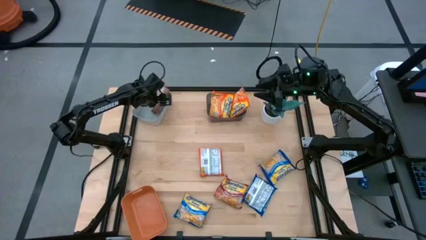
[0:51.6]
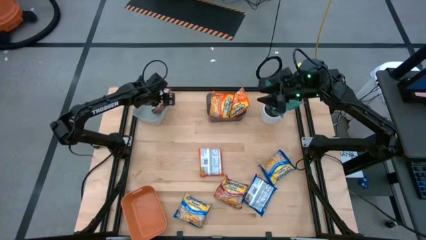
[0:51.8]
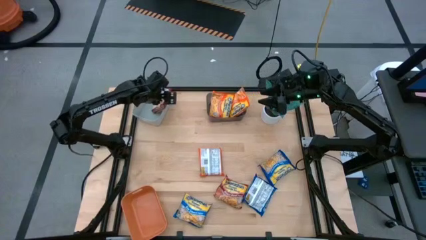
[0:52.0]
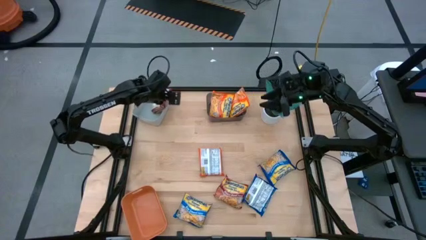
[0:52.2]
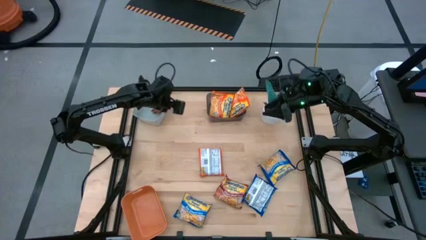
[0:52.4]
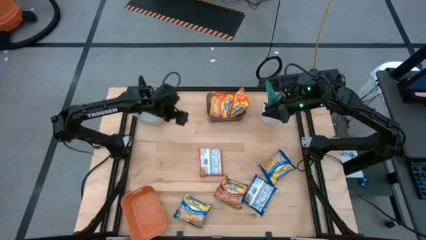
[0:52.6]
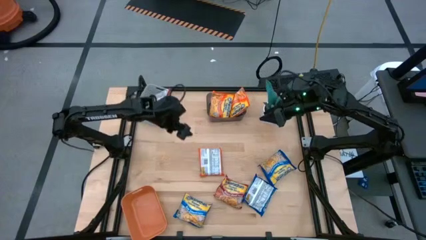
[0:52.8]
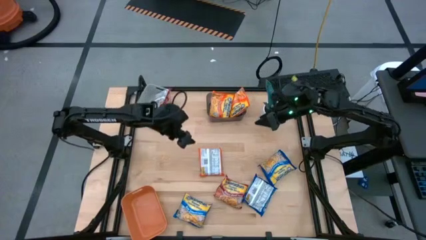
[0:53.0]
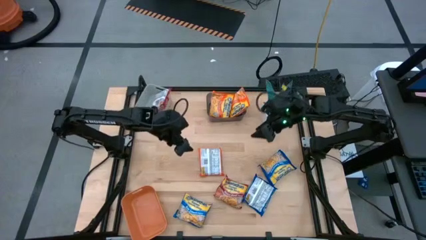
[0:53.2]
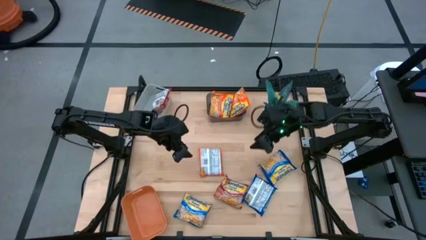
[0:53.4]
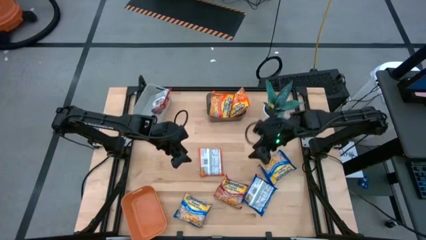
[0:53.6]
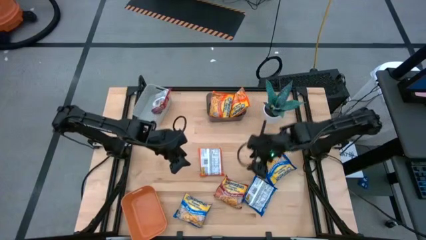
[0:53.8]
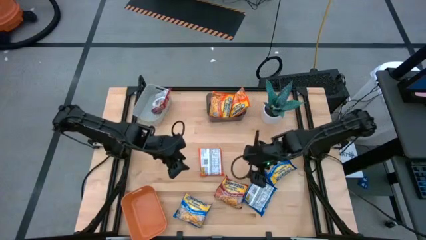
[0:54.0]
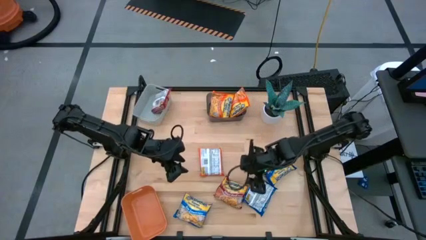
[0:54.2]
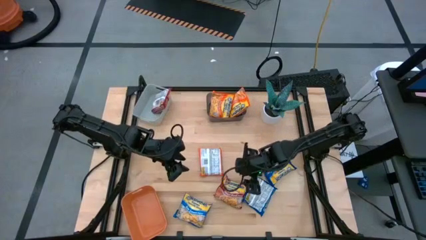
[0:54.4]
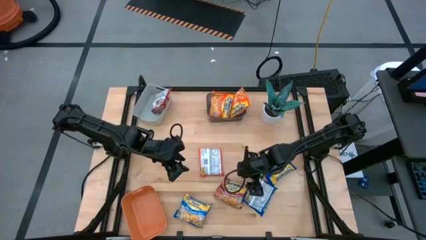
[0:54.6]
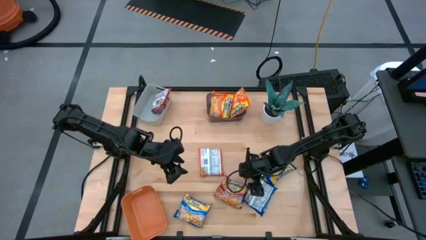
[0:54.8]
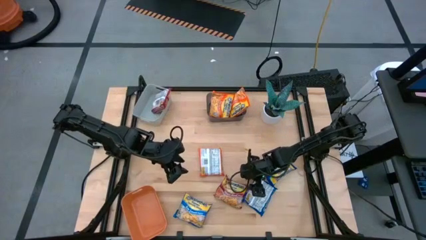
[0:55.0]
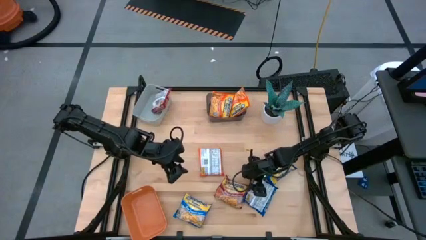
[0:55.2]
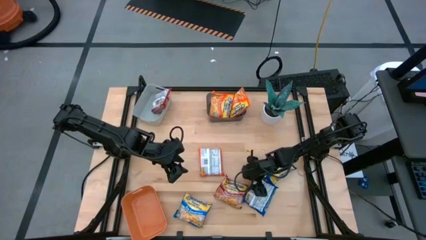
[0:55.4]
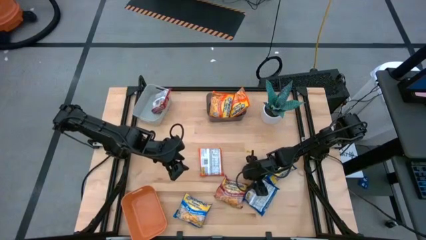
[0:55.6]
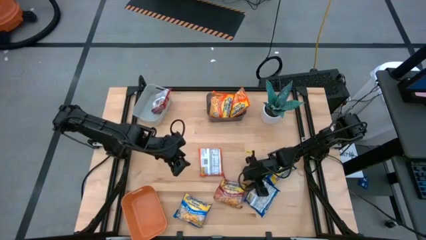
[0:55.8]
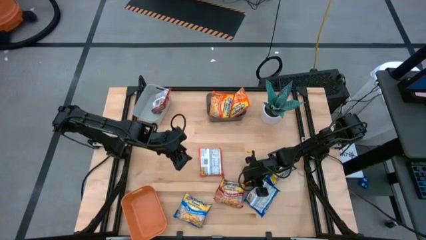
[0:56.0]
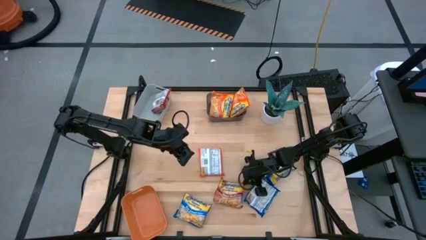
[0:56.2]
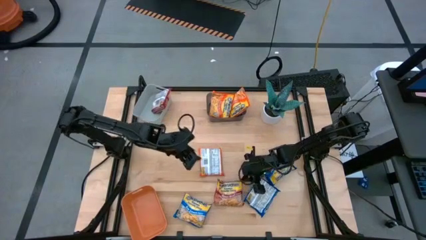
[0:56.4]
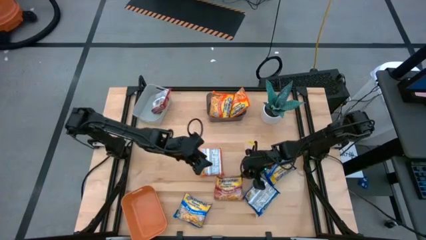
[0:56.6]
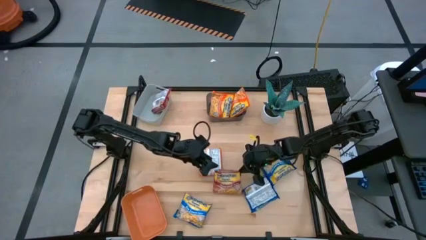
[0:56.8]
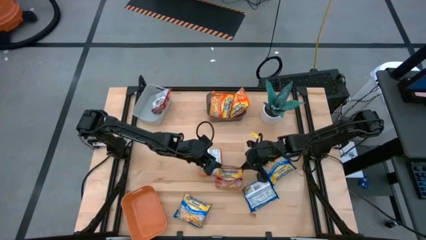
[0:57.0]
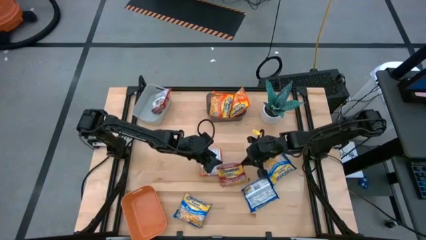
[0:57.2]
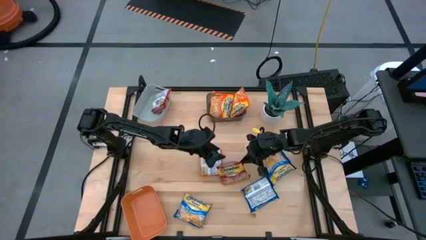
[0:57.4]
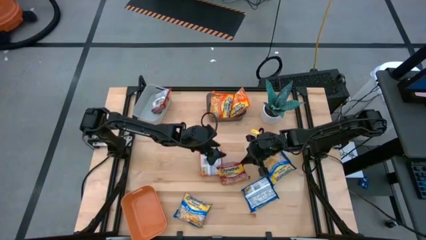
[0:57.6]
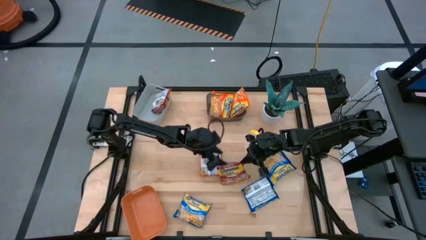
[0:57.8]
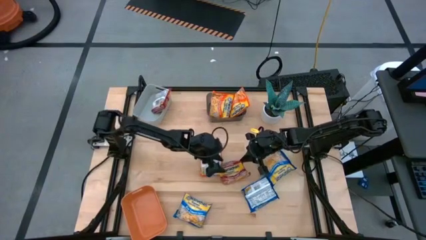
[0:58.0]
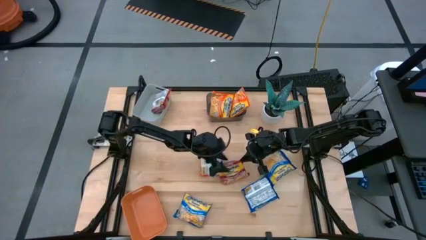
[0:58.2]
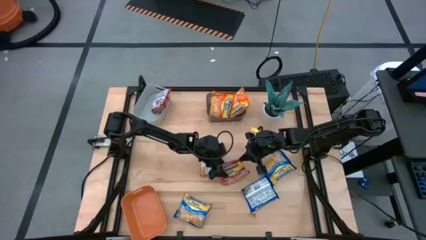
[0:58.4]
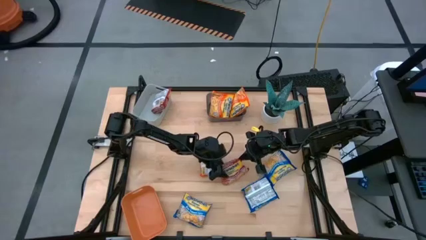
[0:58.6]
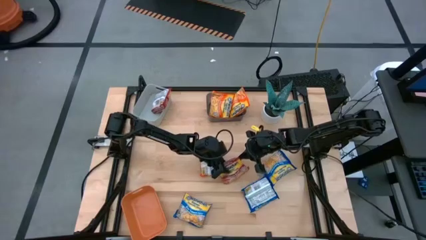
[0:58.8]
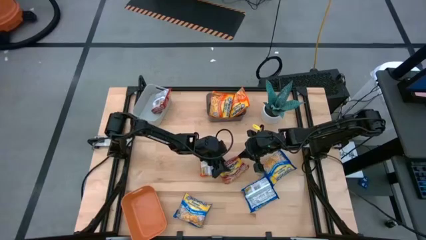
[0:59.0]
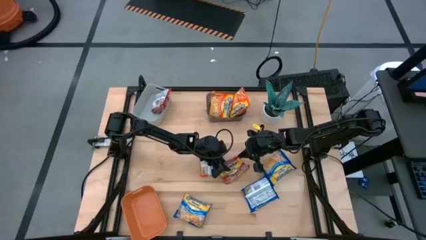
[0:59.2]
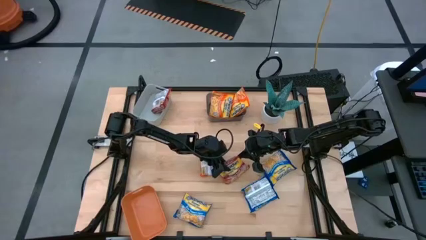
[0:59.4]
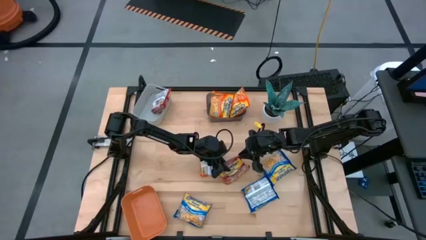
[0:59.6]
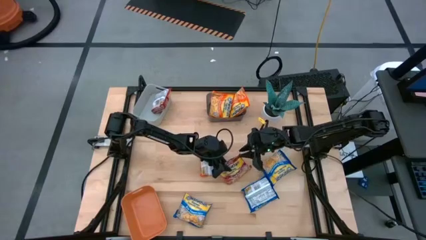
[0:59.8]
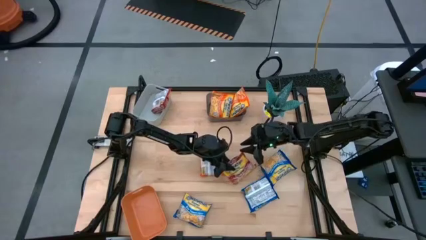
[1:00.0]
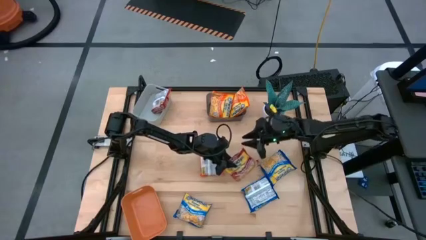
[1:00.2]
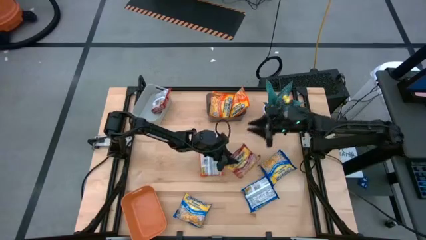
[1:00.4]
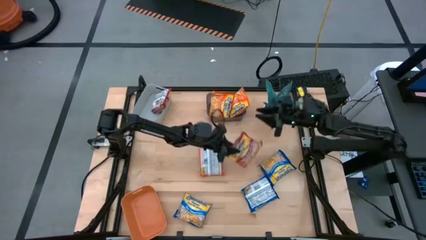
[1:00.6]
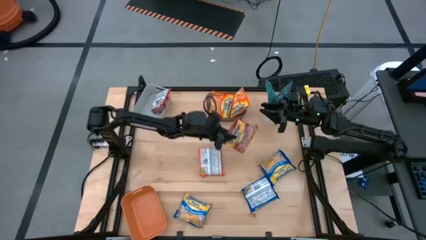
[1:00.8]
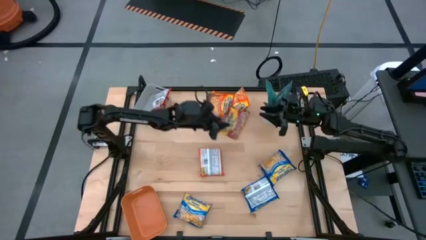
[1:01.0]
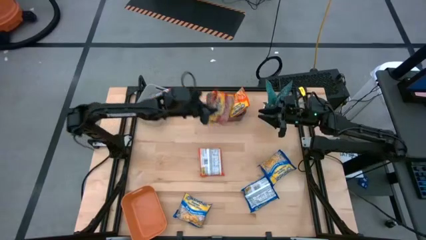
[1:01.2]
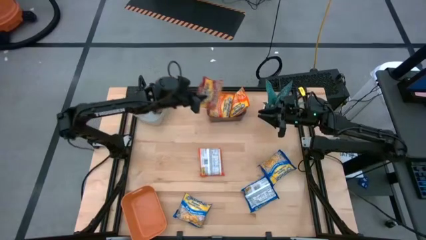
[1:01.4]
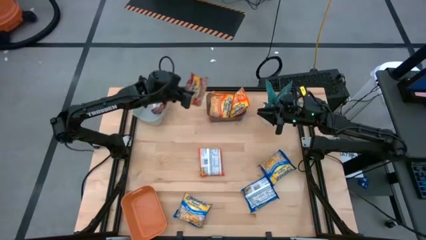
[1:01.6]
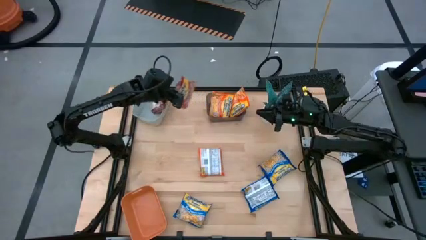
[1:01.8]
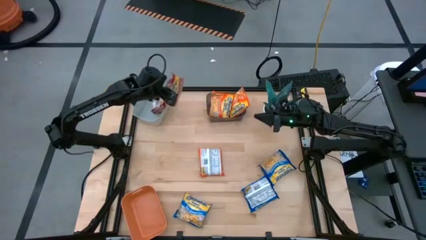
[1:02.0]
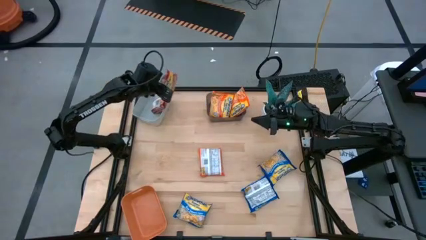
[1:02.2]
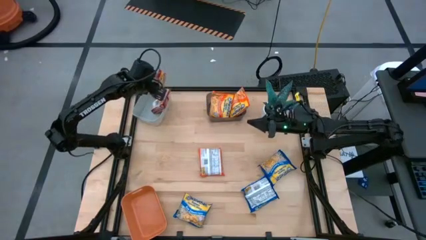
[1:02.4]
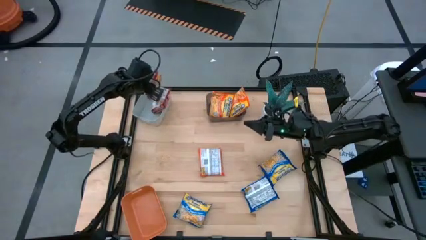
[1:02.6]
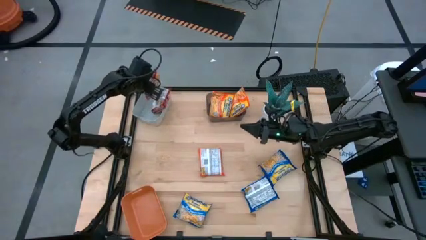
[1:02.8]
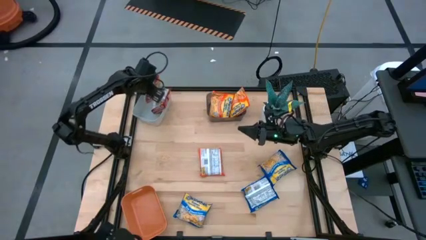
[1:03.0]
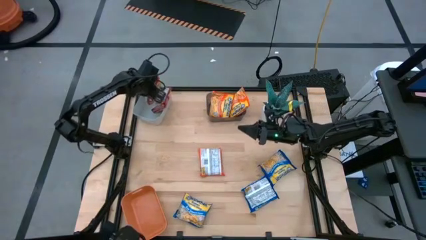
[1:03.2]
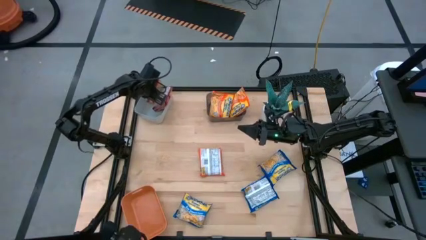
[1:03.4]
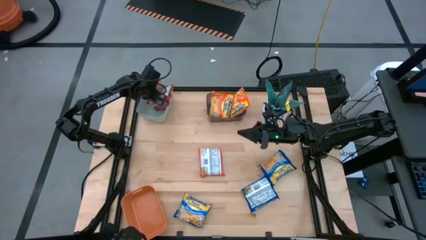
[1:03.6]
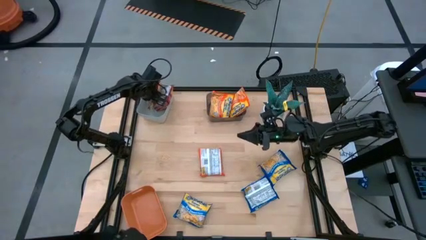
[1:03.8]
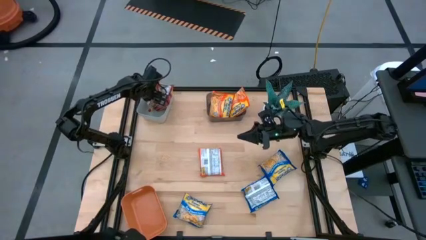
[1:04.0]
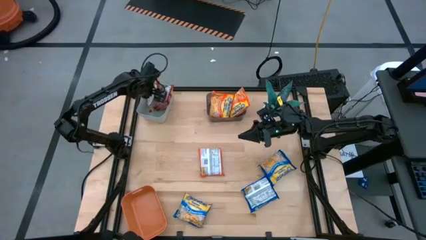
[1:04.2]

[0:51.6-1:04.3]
Task: Sort Maruchan noodles
Put the red noodle pack into the grey bin

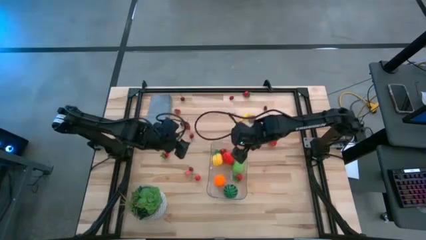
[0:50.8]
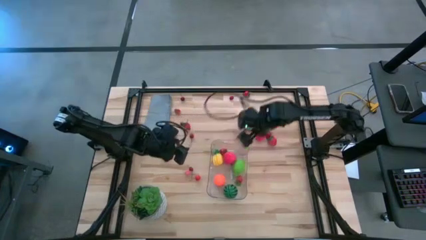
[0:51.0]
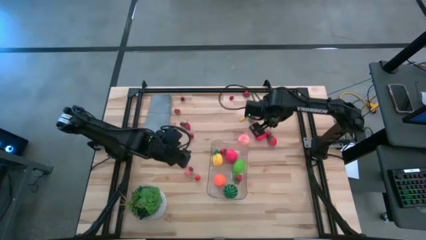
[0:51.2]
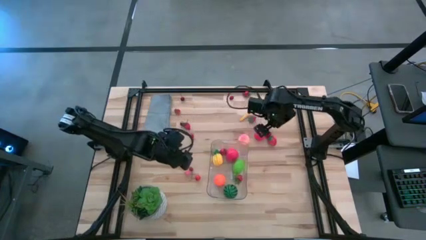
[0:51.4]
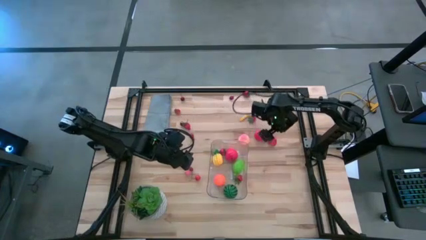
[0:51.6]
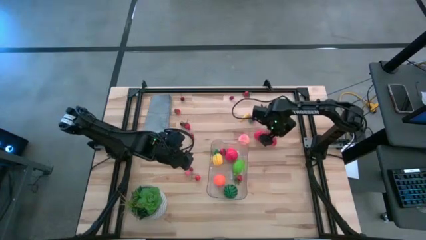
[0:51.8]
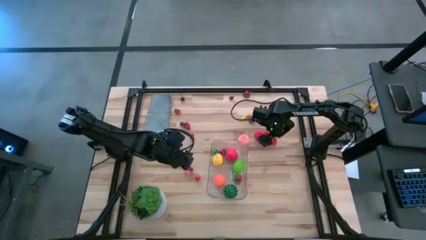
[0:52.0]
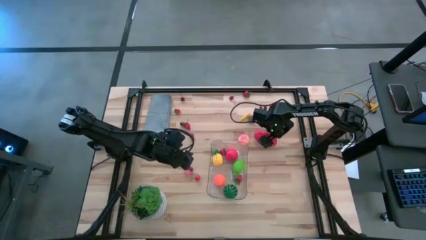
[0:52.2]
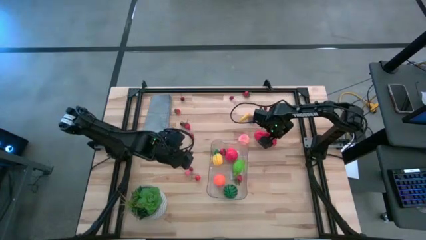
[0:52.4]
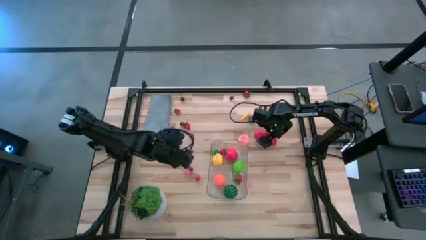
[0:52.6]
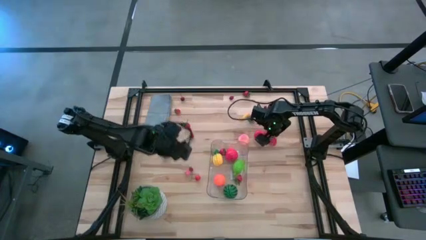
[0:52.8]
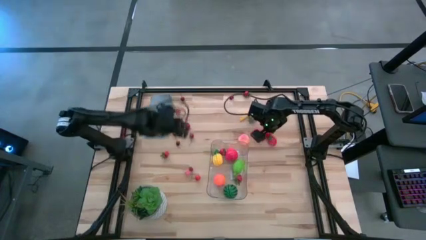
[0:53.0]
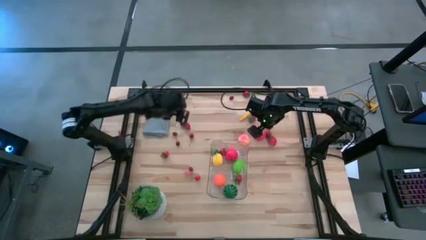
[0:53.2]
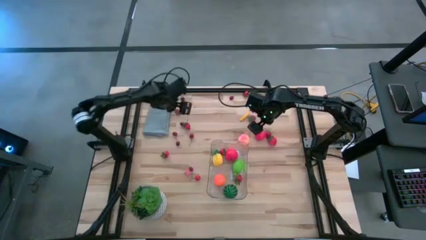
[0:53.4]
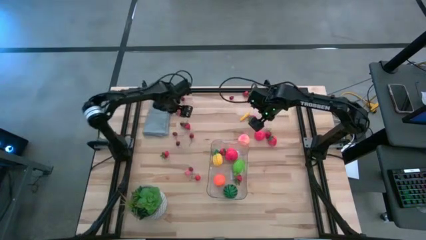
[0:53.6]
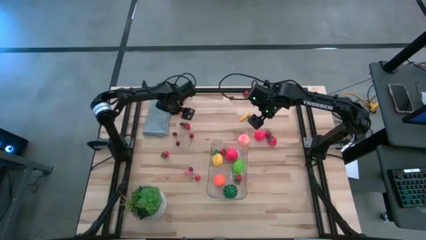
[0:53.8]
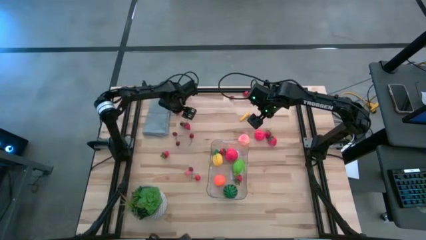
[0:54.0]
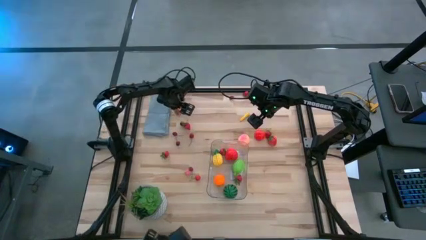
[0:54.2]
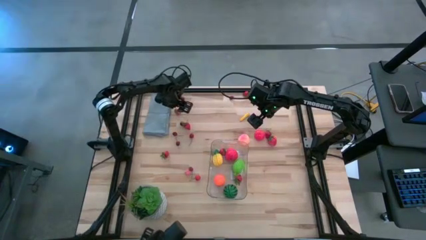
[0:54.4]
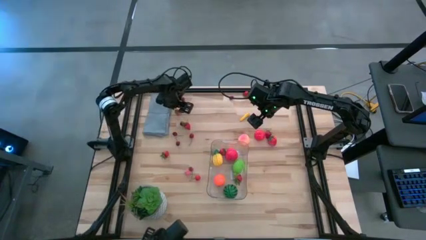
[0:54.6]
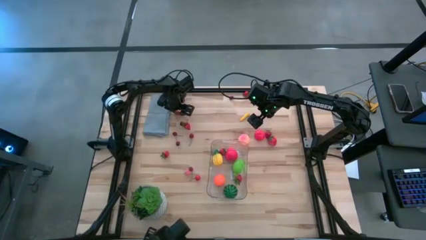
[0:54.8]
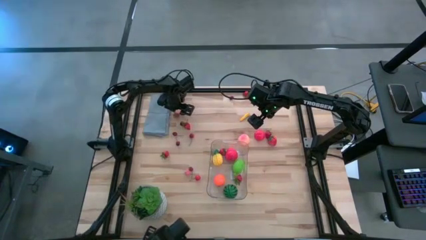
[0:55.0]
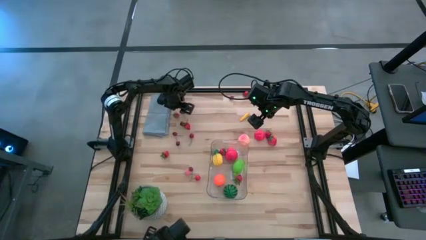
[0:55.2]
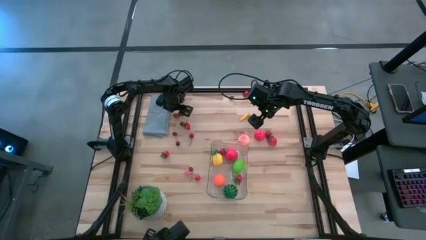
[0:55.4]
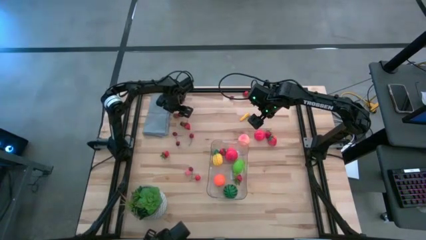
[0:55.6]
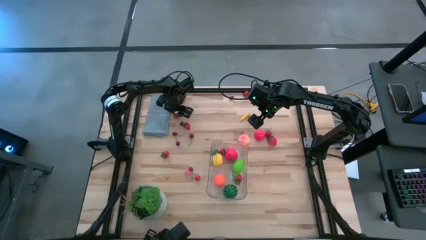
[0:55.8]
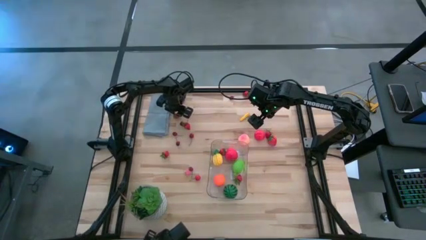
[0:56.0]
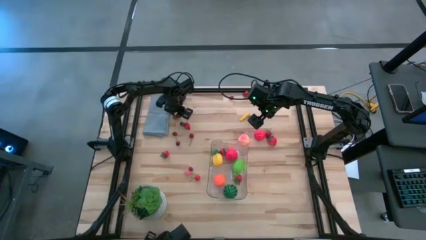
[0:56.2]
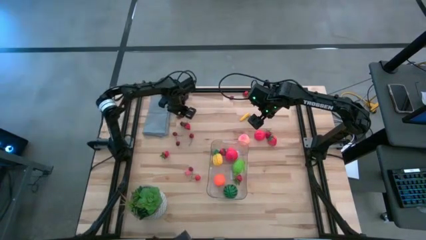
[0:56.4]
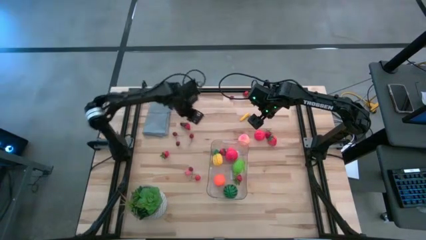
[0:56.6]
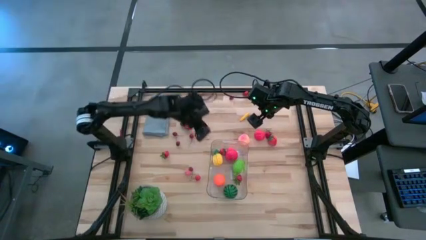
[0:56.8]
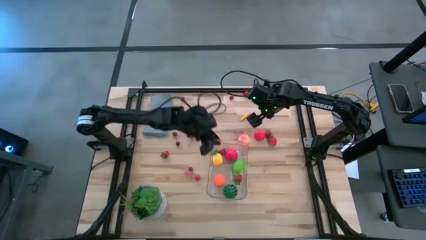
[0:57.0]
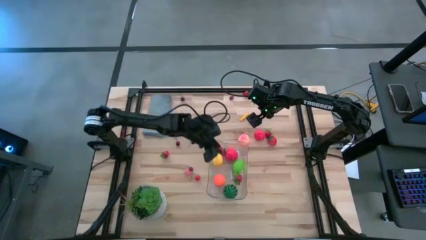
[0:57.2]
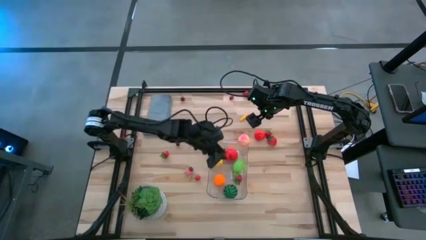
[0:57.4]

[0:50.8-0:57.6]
Task: Pick and placing Produce into tupperware
Put the strawberry into the transparent bin
